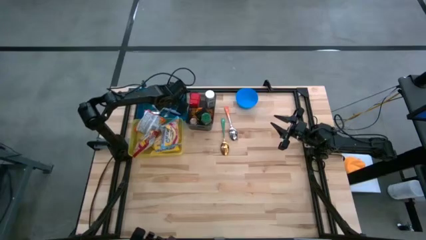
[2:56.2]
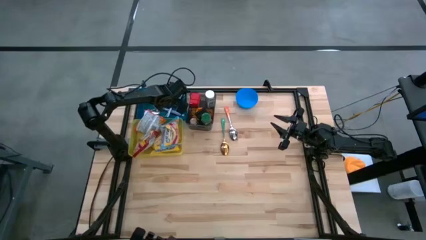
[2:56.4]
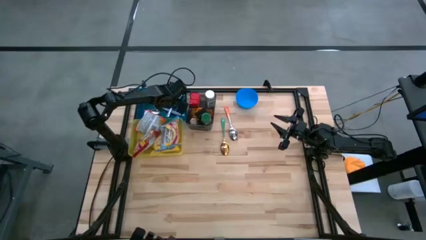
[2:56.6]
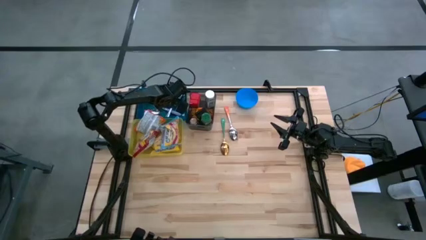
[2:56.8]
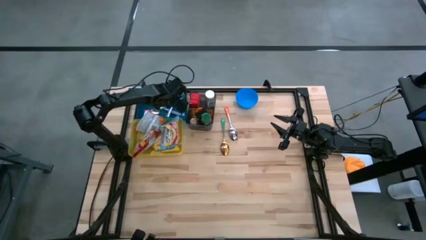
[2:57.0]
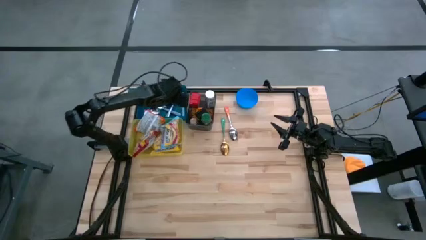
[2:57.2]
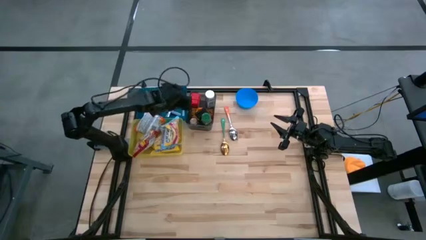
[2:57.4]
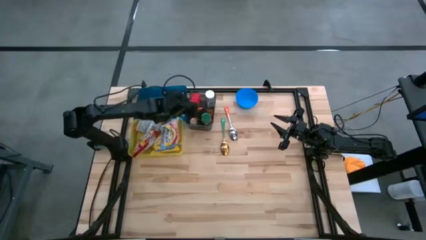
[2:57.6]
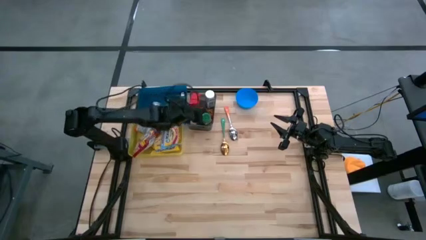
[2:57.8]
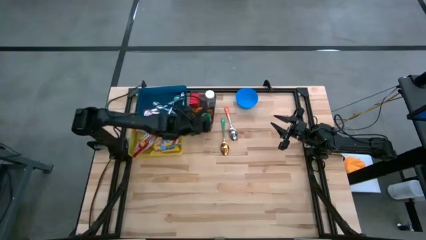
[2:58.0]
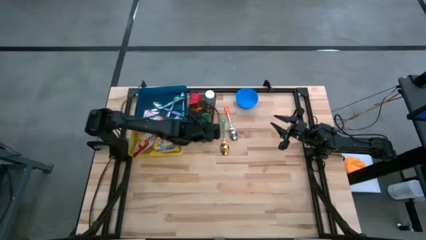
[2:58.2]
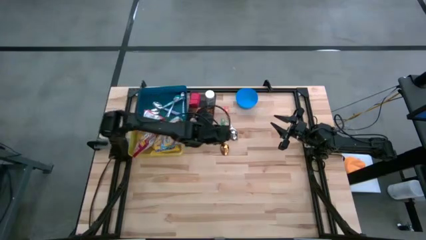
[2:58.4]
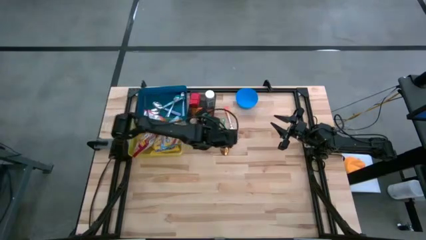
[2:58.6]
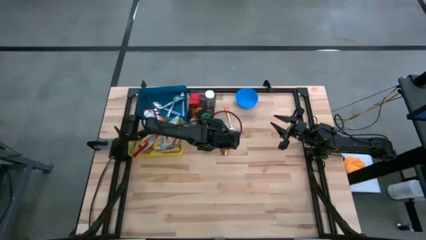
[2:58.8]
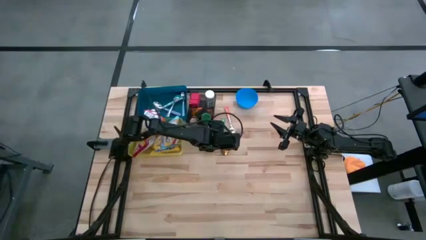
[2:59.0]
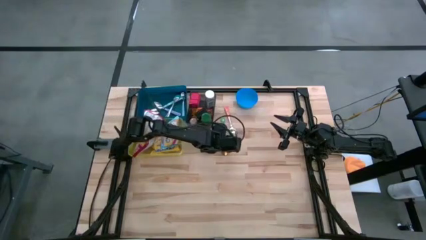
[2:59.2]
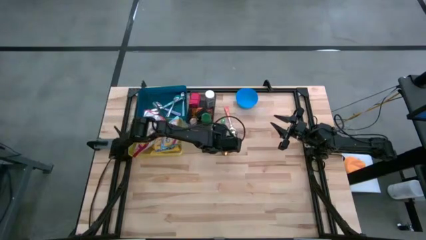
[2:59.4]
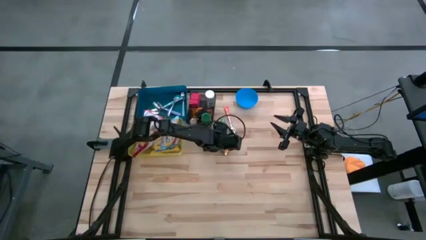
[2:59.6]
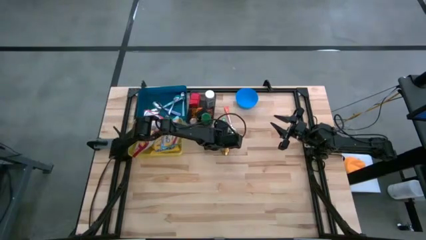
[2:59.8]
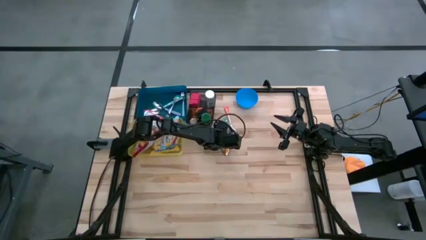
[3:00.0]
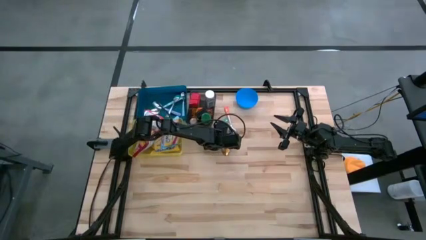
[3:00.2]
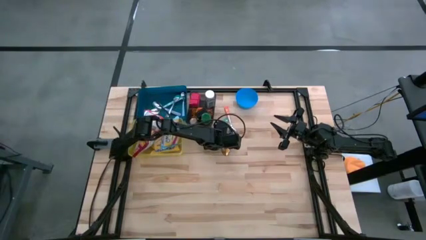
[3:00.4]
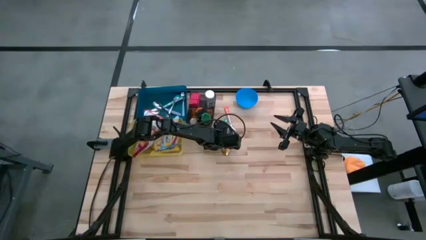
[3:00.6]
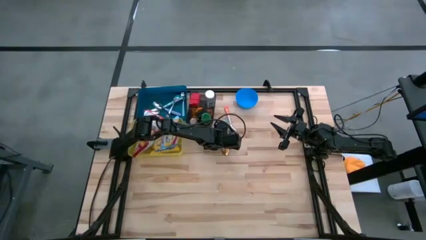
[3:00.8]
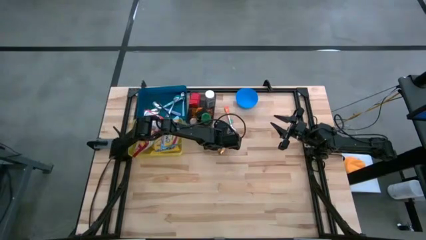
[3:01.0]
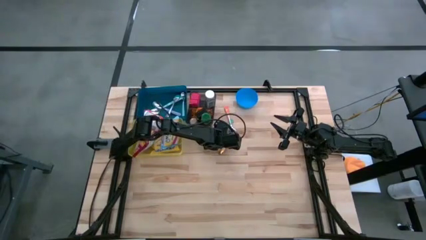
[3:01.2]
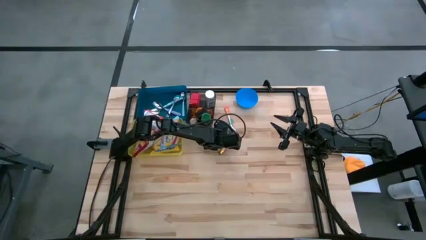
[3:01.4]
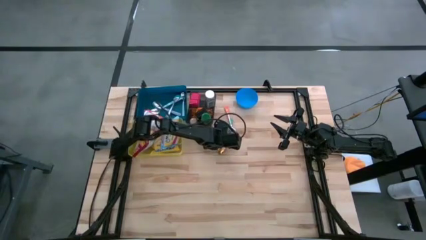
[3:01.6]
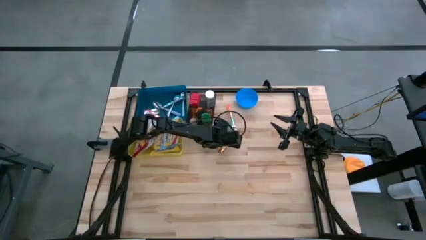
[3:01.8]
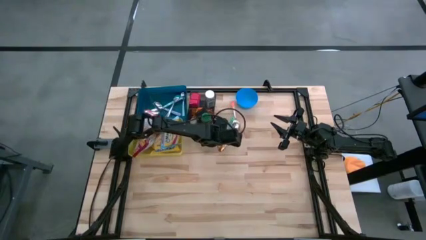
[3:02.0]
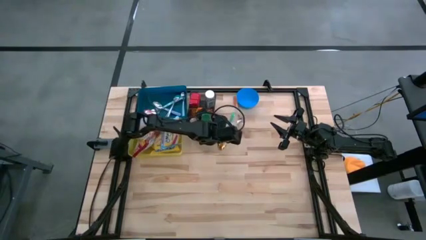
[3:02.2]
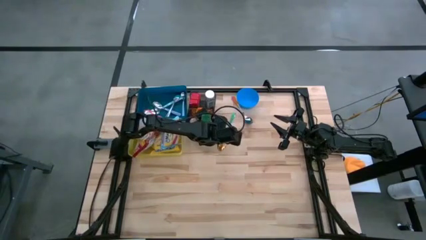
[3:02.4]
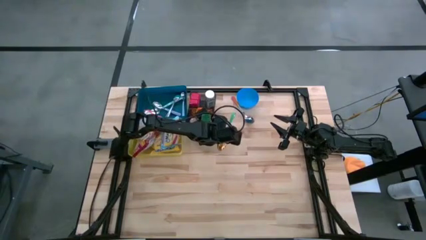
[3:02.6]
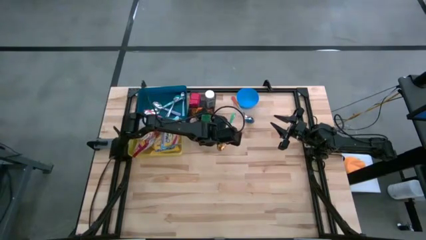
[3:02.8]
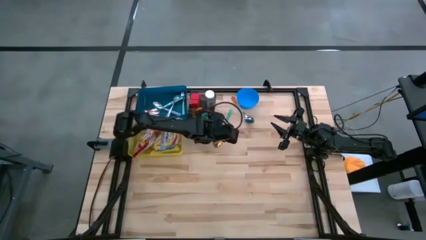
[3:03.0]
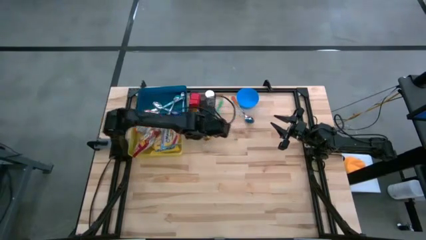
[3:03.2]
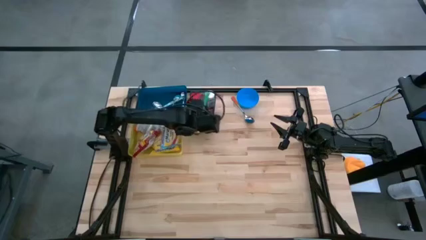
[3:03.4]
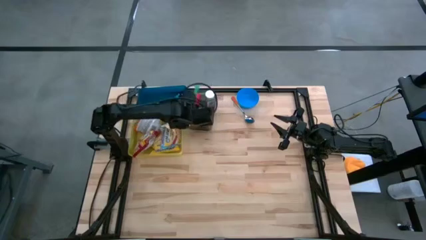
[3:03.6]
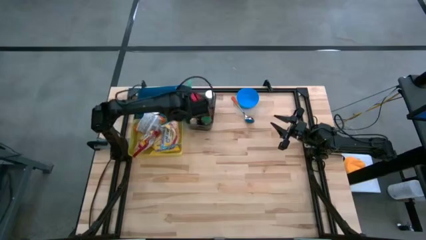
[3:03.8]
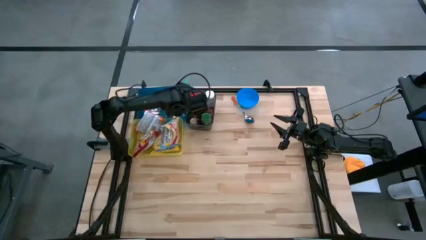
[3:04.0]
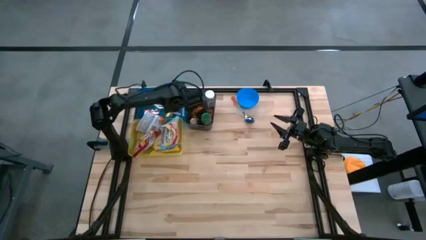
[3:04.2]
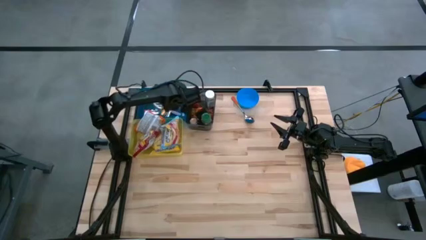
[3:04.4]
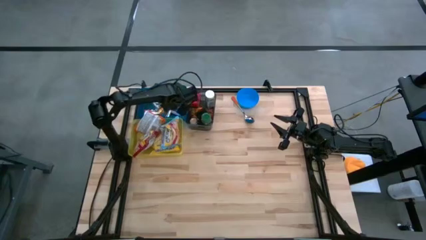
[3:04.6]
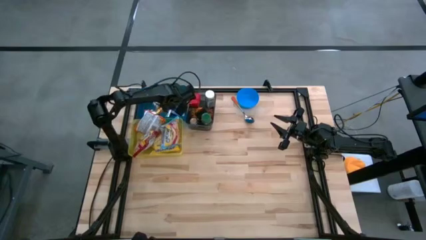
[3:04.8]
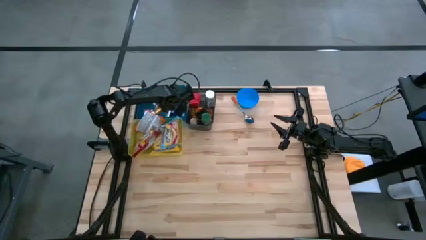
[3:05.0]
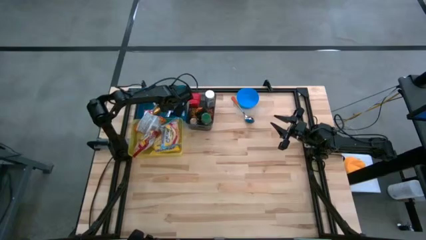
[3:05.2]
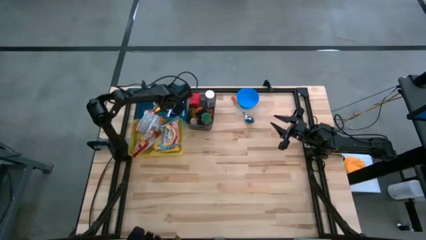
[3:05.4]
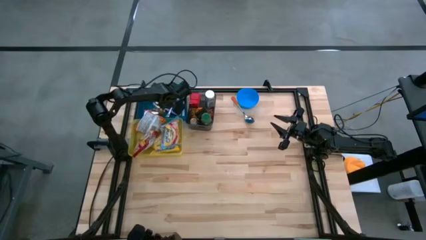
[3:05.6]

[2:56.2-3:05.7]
Put the green spoon into the blue bin
